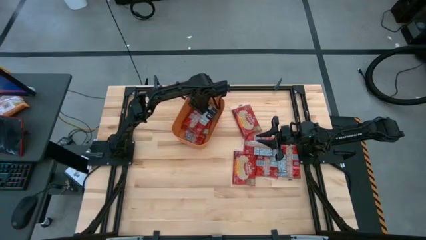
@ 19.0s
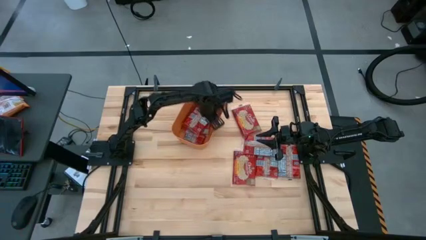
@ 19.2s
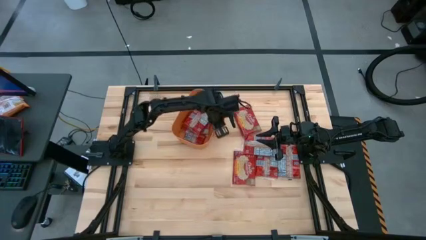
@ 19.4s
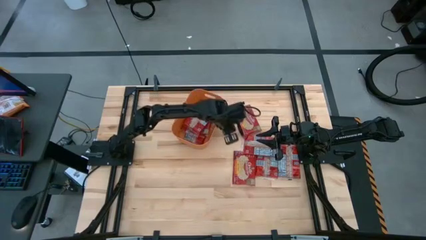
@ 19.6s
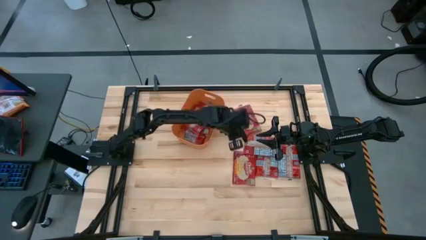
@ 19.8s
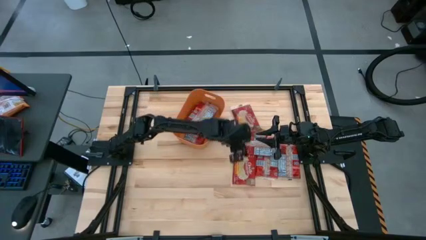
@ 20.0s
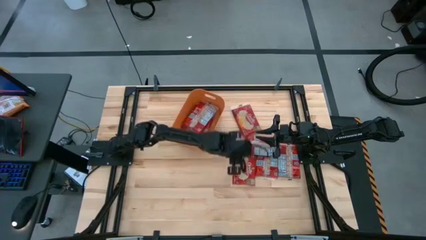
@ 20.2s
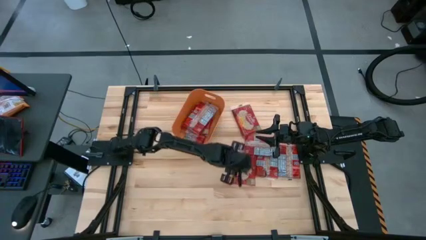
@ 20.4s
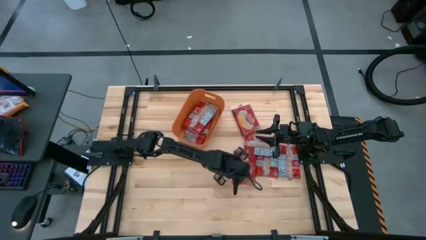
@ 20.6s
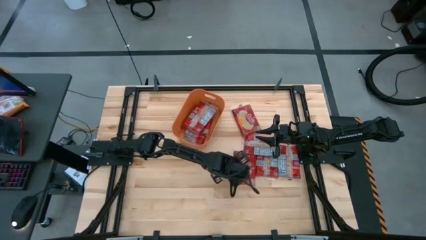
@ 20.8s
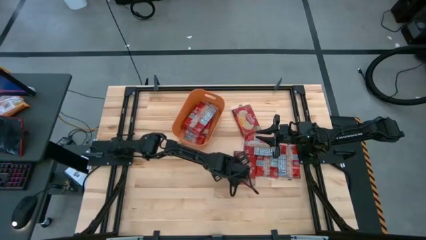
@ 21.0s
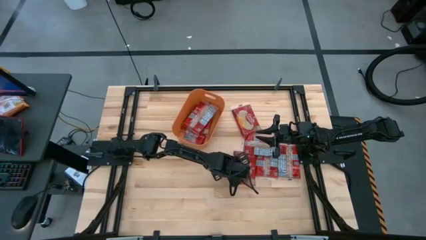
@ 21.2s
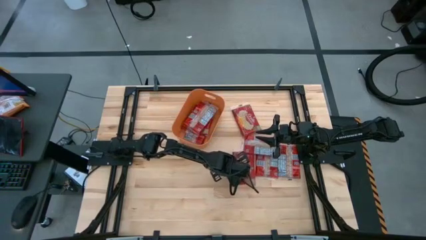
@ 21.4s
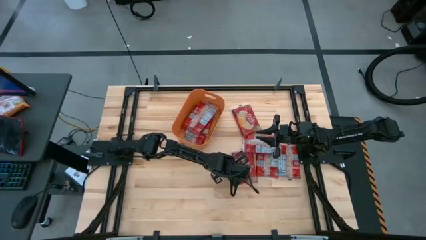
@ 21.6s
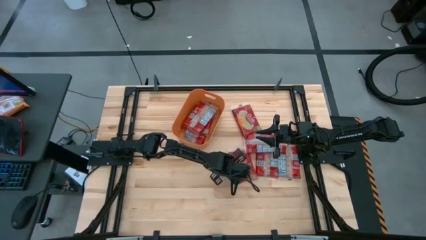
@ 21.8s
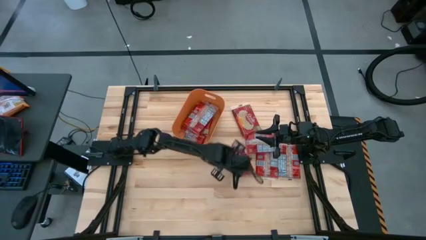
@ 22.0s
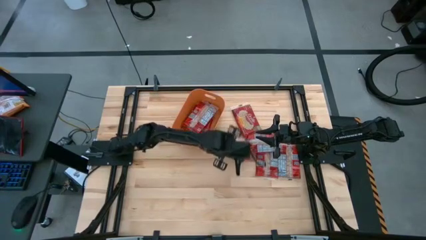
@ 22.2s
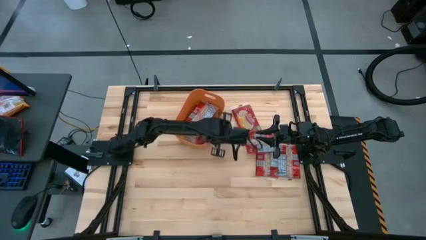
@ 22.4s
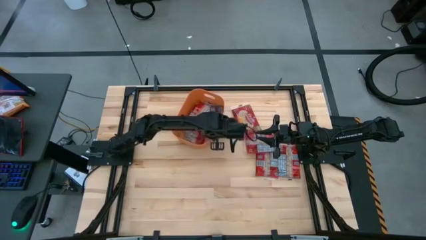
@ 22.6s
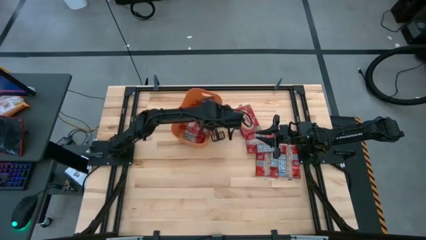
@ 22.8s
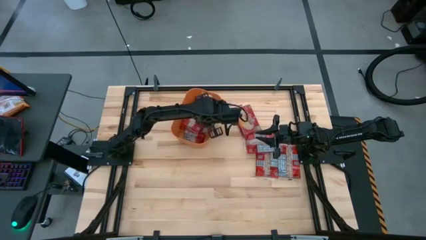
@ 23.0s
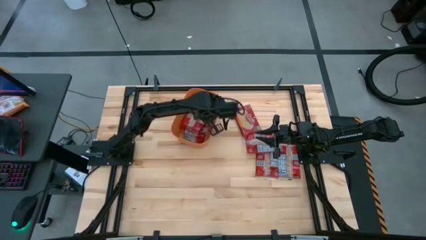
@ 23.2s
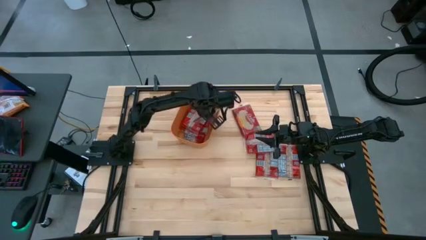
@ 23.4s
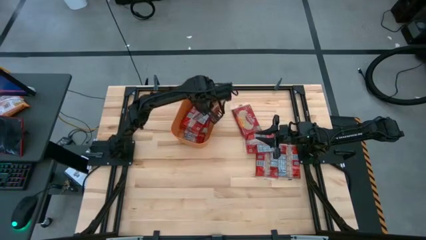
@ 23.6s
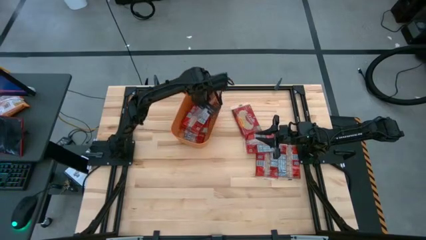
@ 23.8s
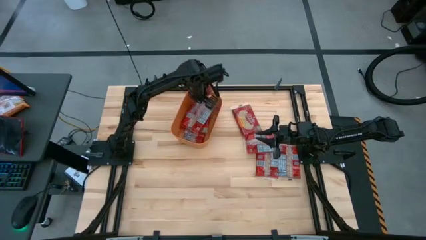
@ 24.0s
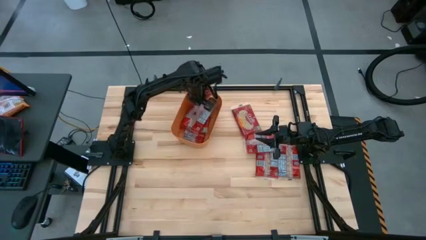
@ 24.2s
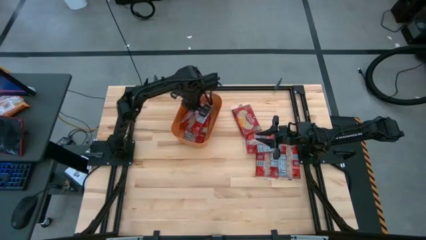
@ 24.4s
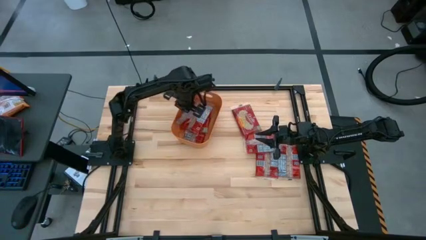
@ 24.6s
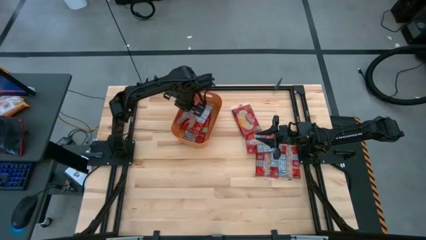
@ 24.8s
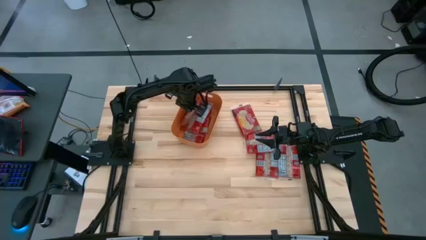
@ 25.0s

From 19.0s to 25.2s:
Task: Sort popcorn bags into baskets
Put the red popcorn pack into the orange bin

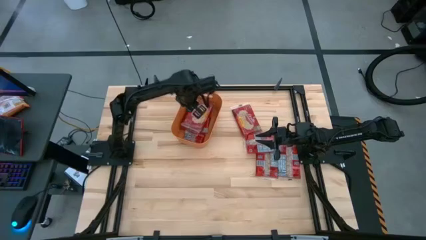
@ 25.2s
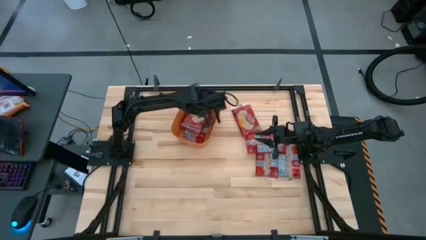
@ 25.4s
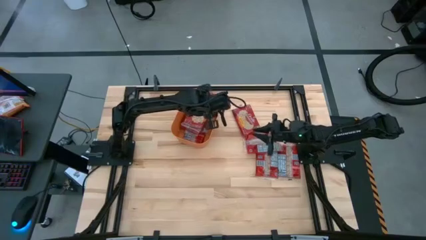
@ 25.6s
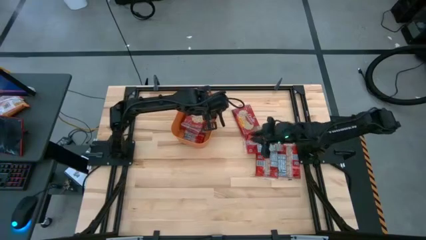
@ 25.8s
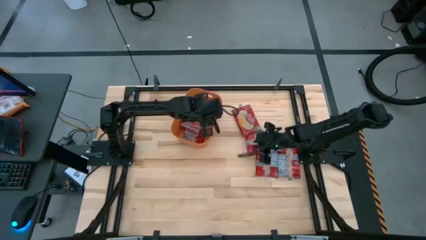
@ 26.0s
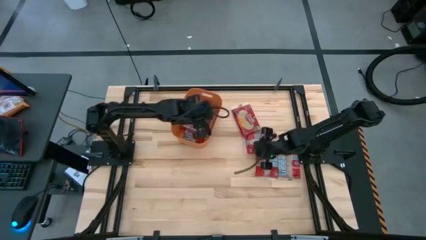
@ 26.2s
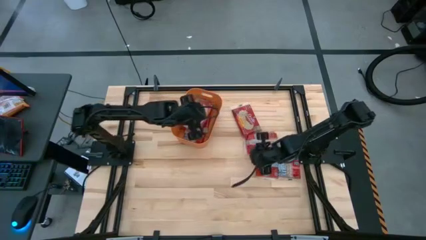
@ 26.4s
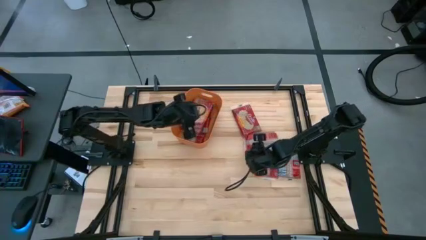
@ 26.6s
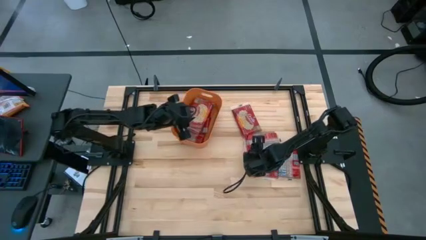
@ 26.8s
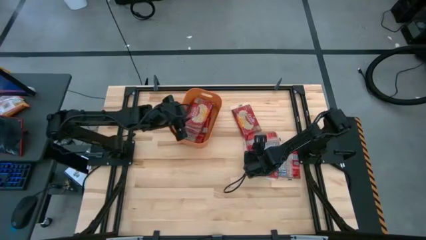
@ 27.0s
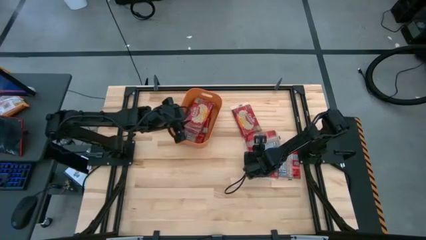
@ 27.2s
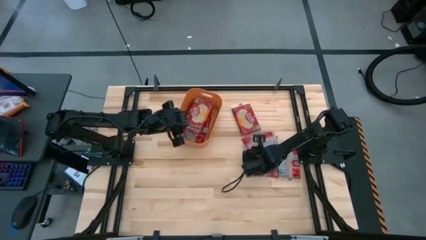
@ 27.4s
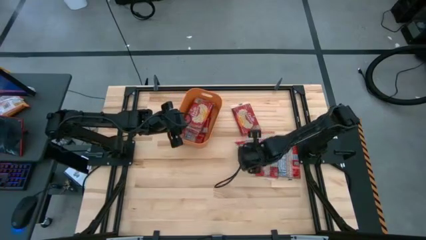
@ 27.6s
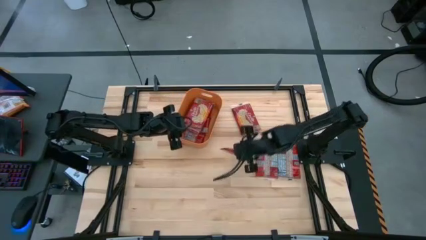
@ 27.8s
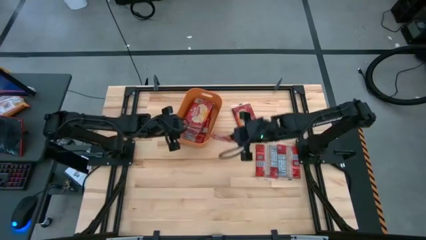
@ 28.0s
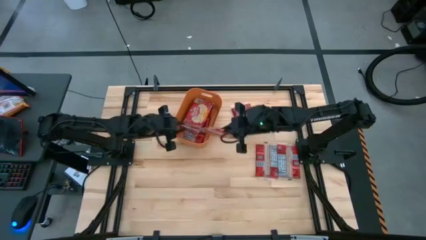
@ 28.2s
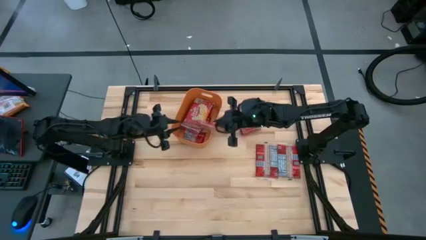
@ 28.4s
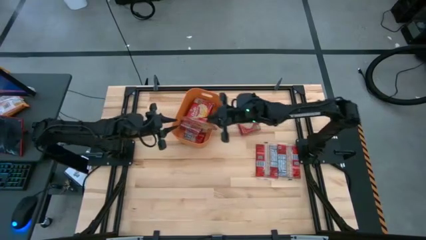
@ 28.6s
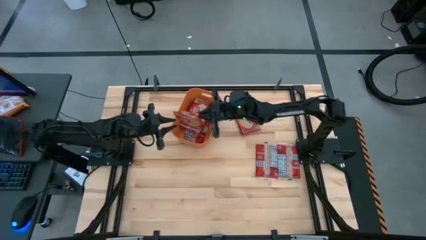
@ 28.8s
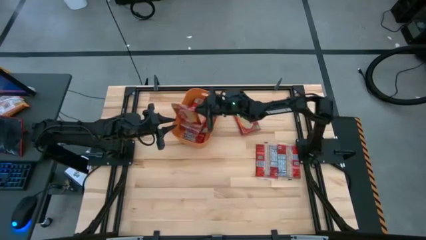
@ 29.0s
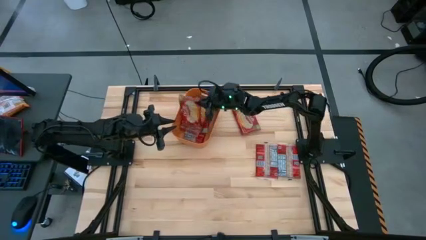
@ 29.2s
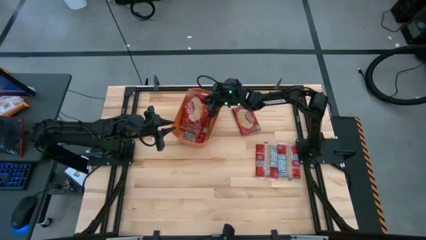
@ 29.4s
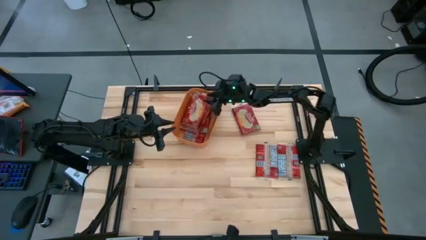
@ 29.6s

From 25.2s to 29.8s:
Put the red popcorn pack into the orange bin

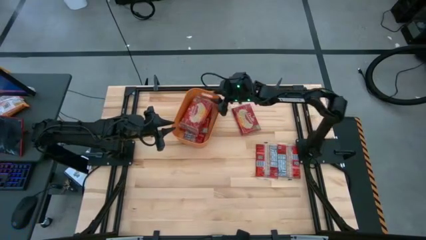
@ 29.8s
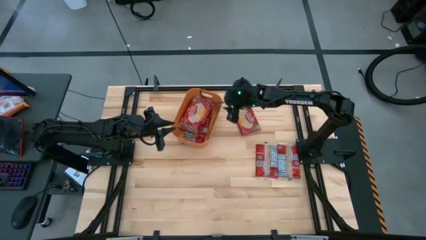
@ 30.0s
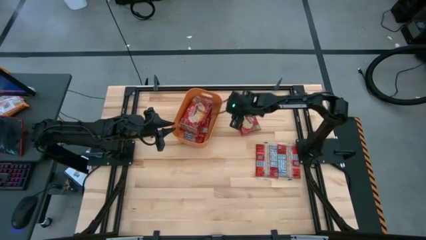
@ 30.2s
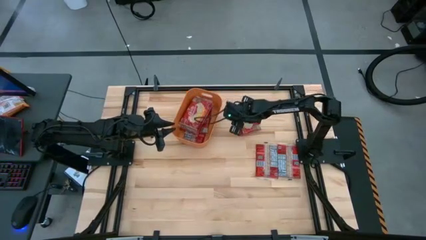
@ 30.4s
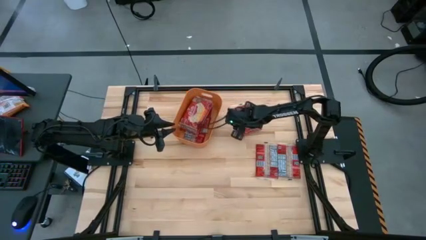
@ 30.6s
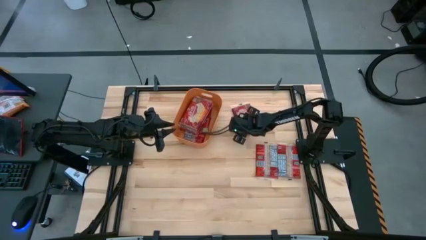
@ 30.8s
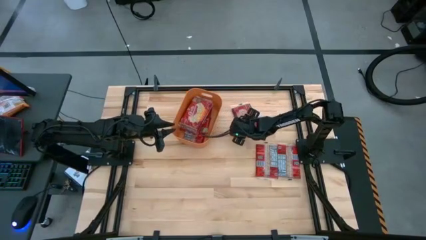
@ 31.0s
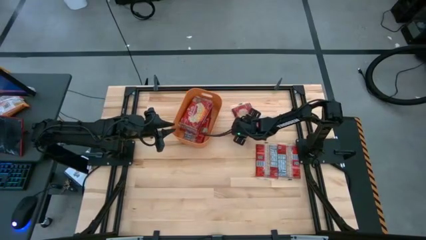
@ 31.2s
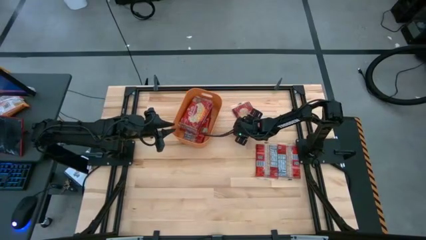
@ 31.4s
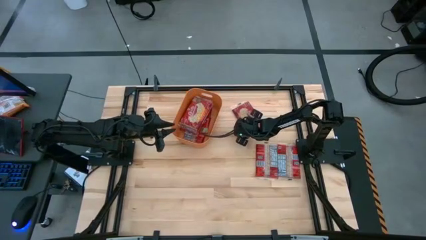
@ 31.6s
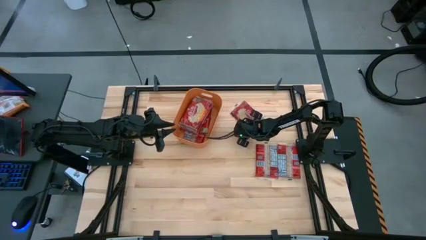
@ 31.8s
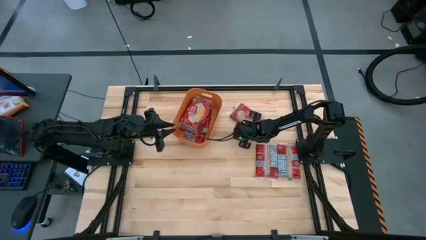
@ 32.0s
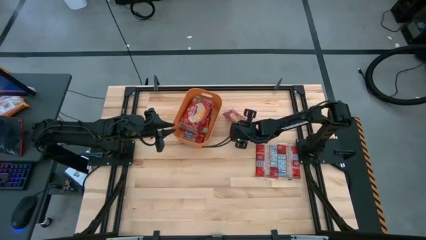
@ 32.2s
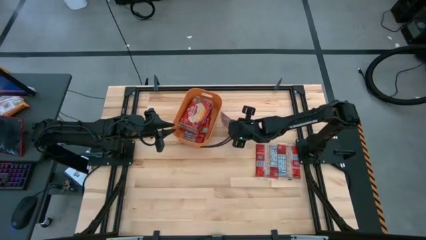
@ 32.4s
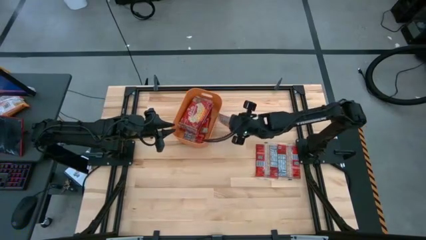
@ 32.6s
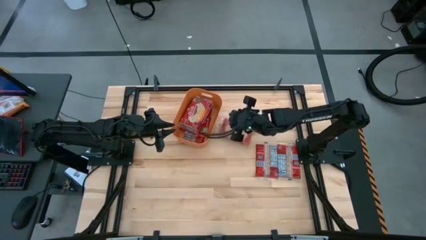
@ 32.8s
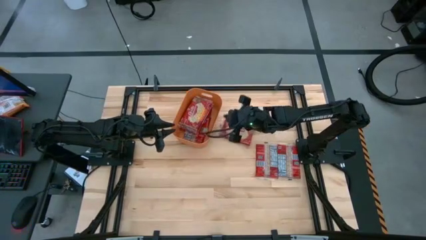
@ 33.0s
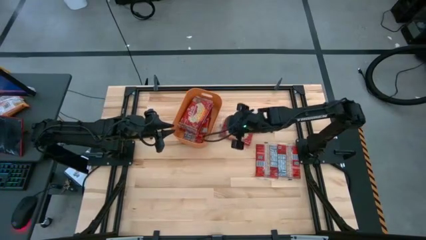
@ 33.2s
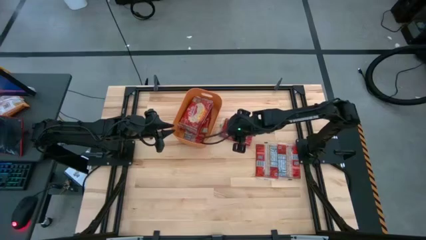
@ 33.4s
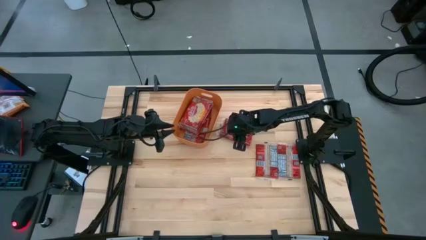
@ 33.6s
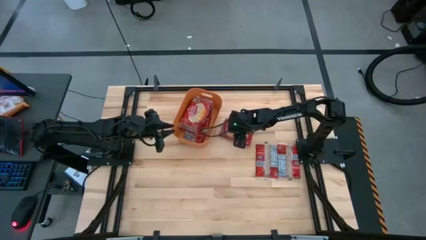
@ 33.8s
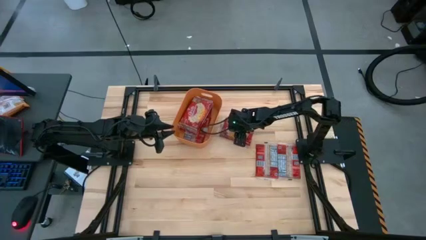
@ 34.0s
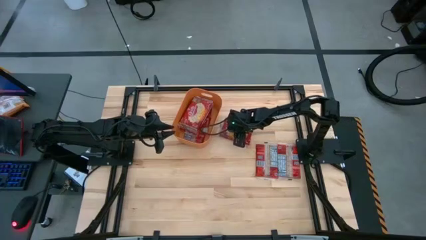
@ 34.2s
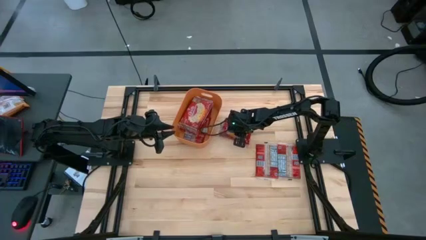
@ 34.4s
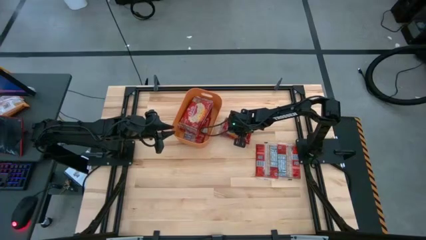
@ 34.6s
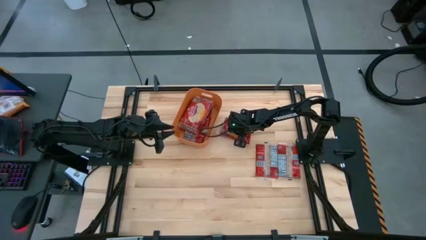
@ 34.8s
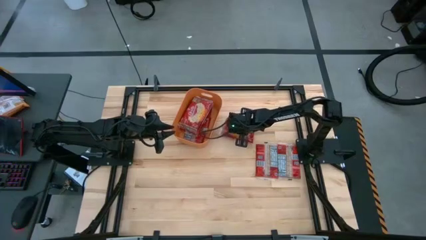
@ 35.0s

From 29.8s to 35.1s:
Put the red popcorn pack into the orange bin
